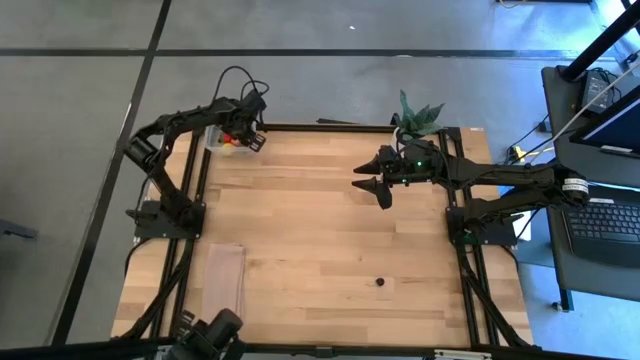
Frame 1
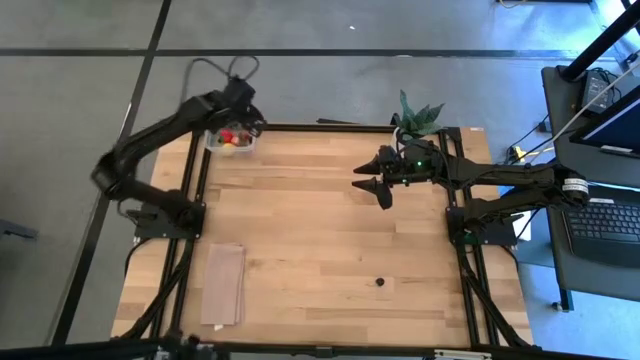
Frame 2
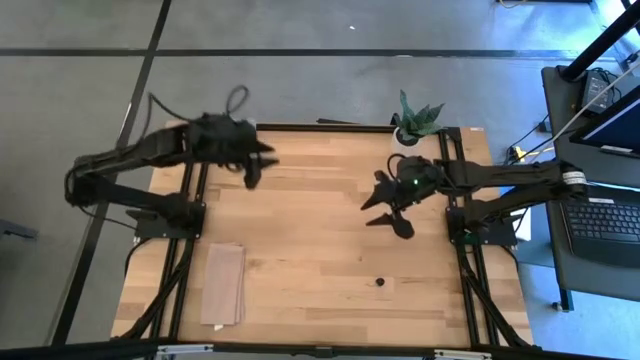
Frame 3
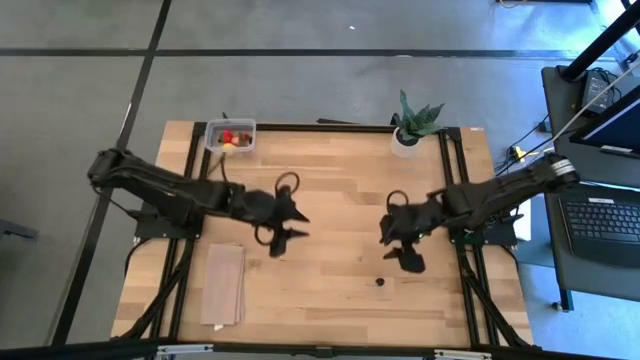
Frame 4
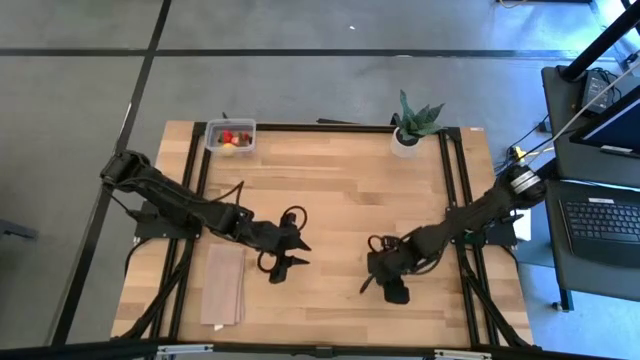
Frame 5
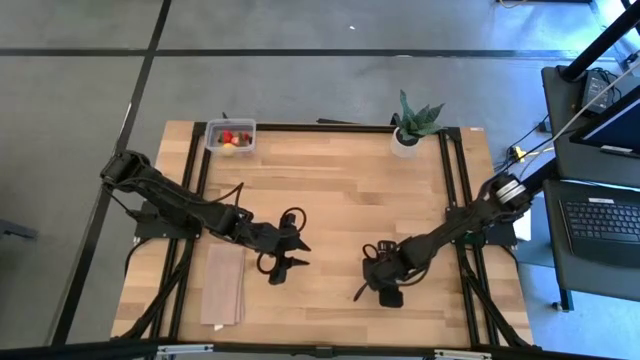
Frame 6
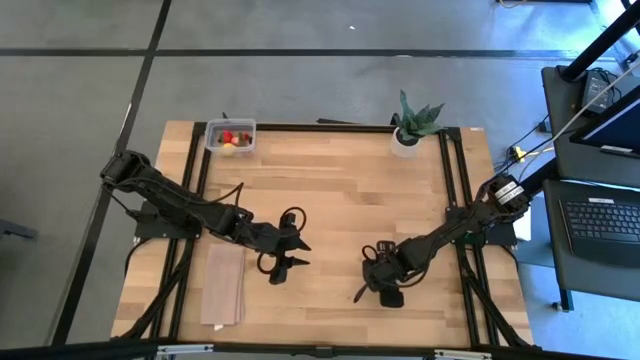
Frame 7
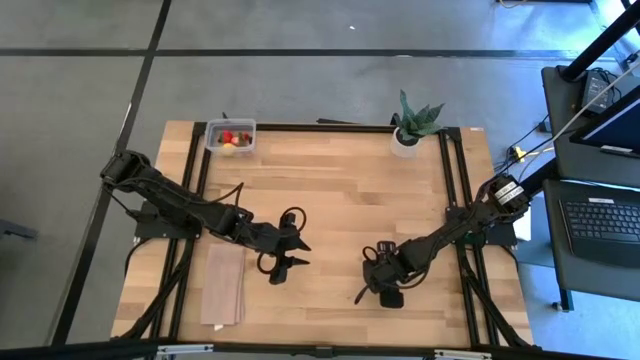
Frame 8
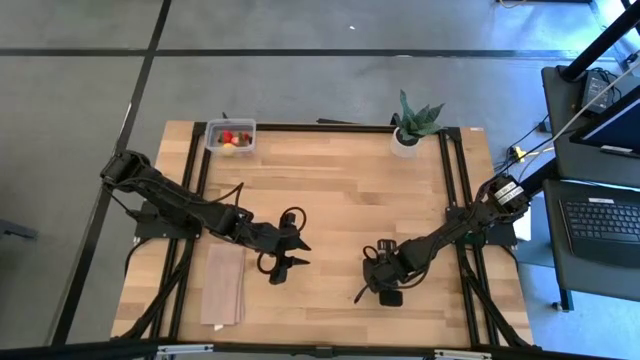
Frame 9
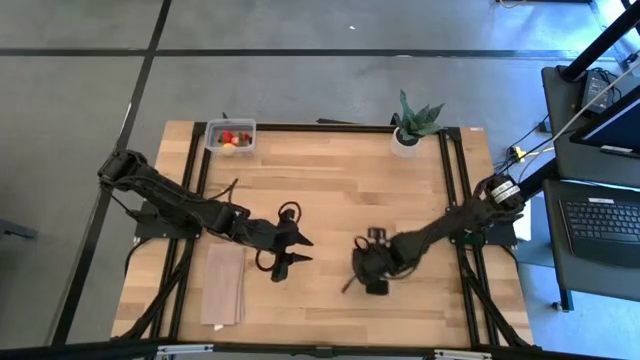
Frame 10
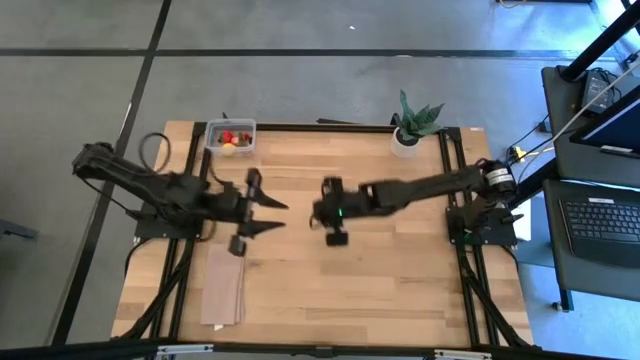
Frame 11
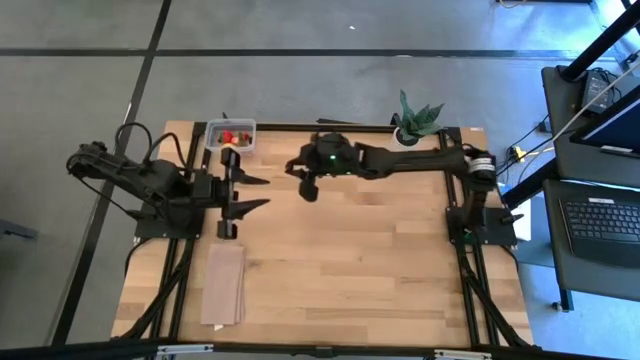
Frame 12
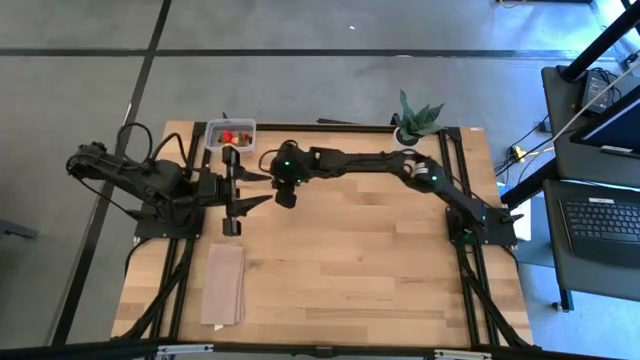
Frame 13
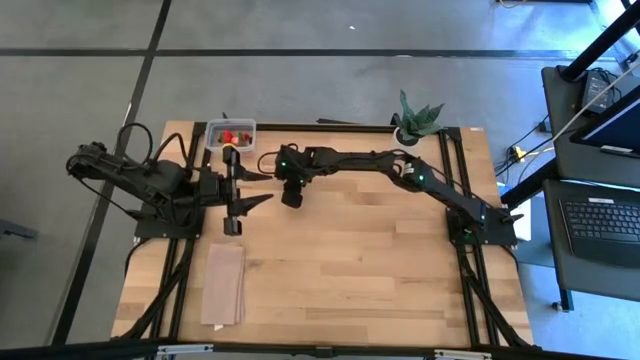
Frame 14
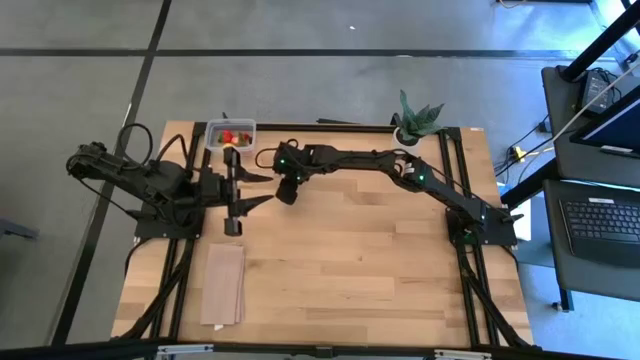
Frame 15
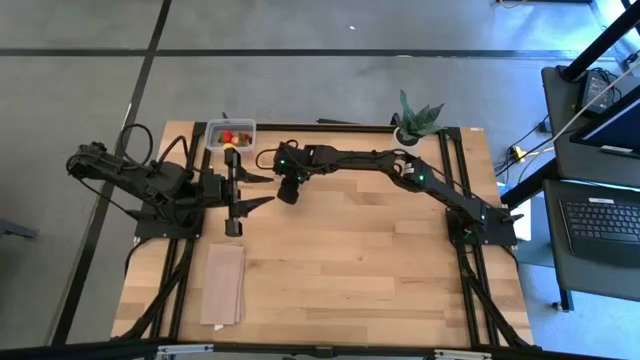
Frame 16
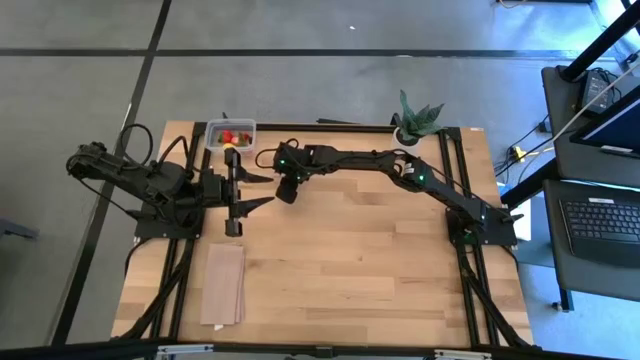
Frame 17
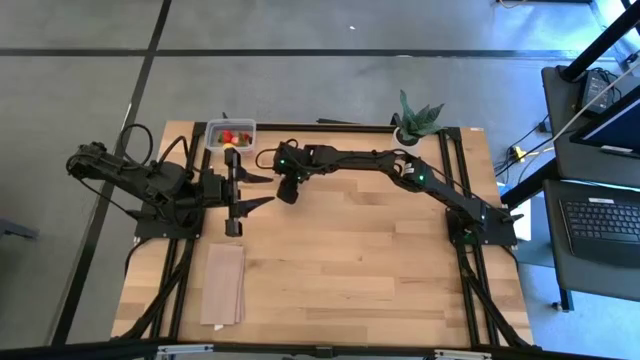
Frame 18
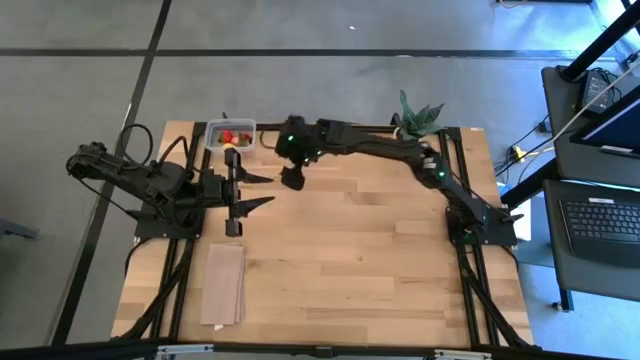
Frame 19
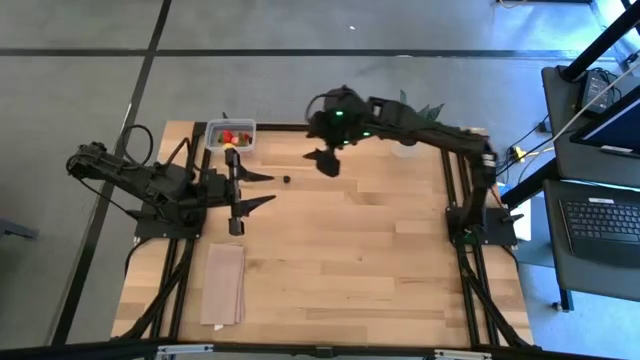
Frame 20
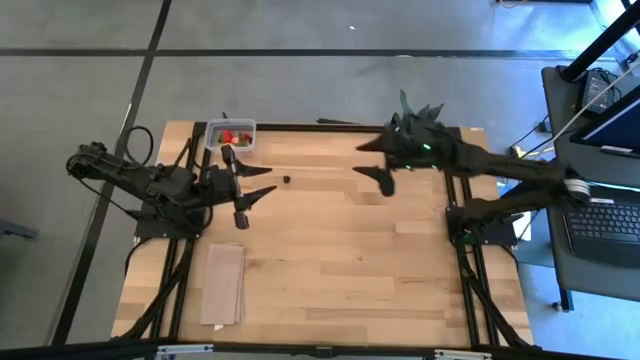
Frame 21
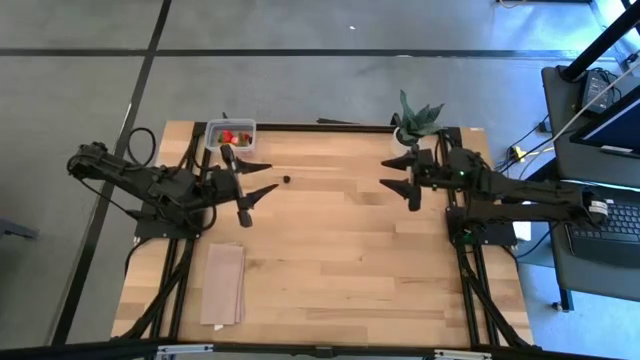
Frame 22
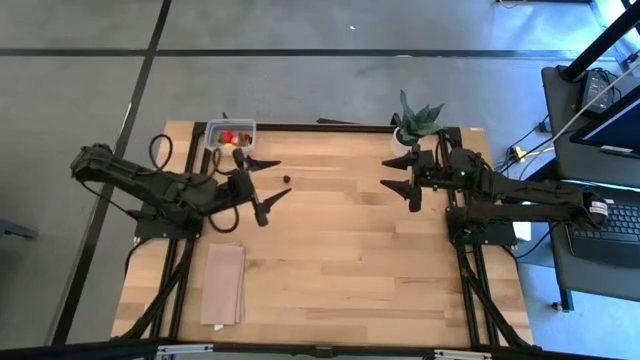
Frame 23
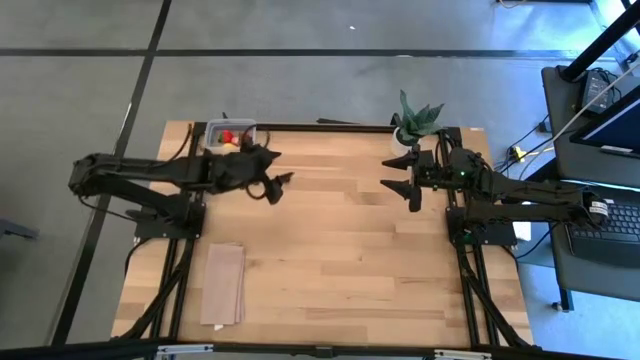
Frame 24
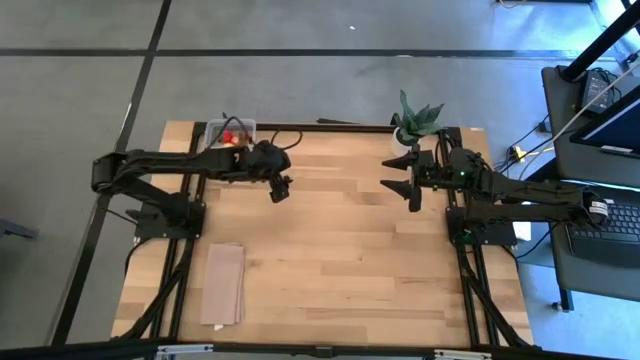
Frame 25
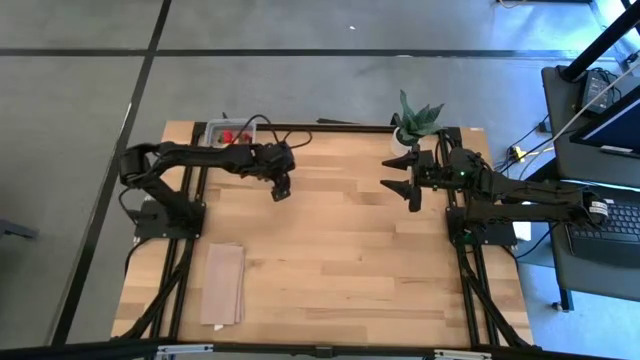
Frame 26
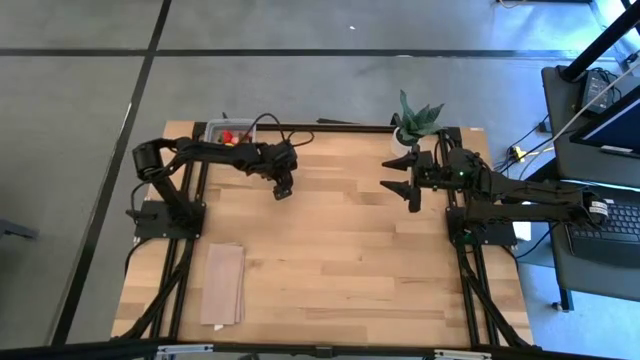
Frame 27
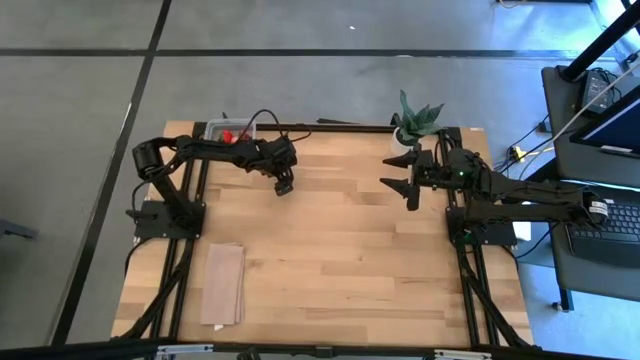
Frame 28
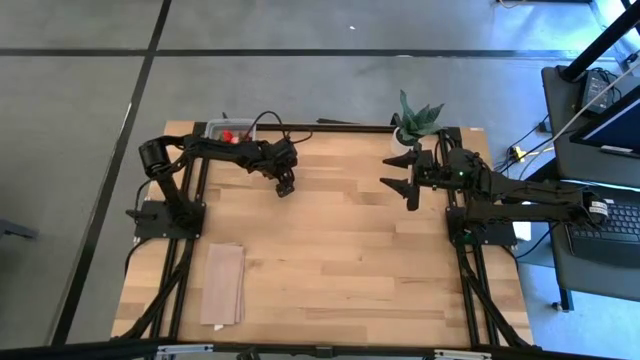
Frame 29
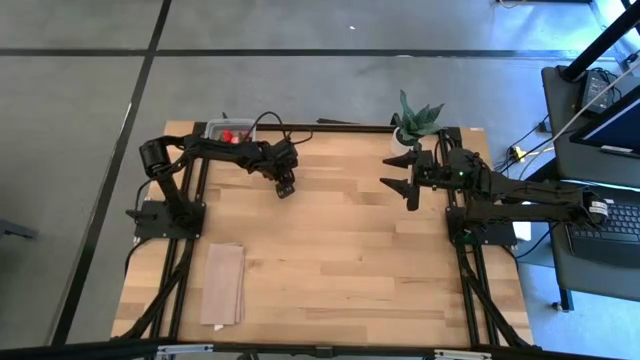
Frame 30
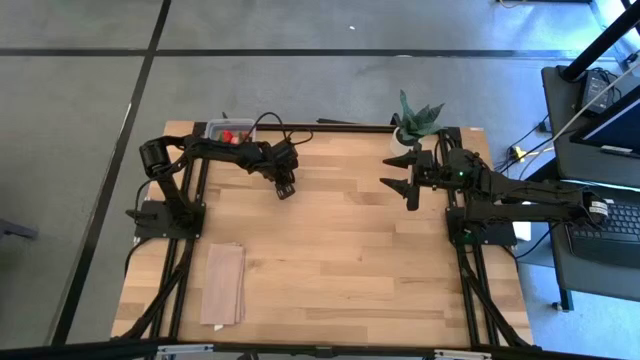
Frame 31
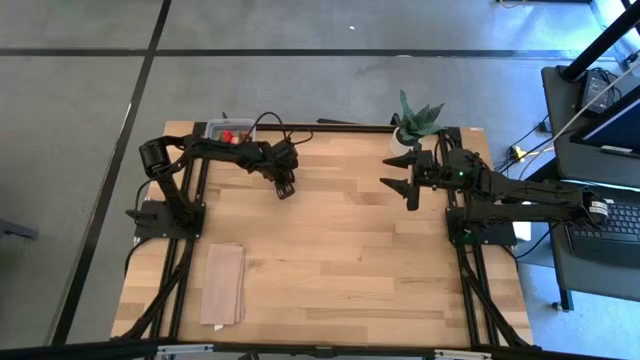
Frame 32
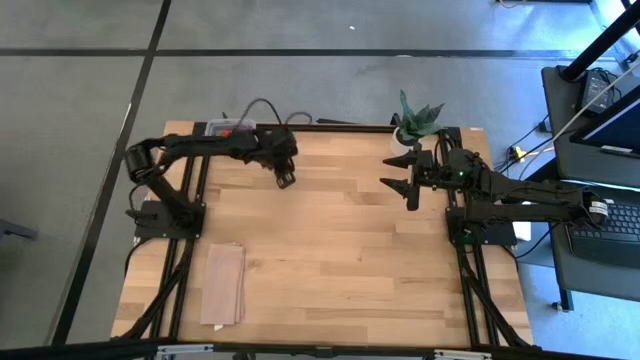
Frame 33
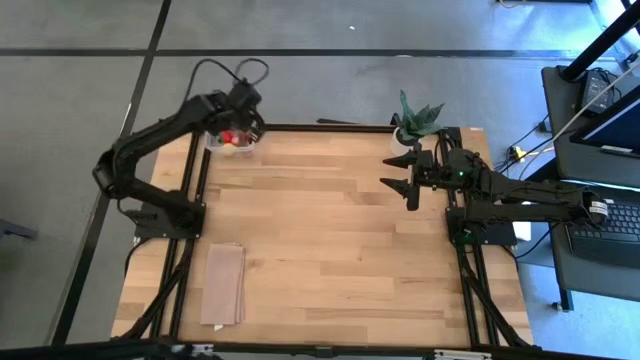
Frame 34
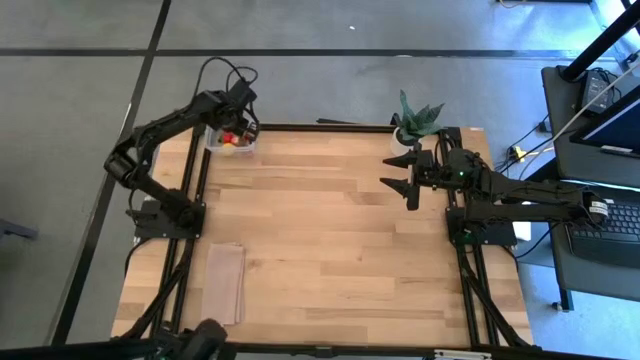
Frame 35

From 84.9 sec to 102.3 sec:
Task: Pick and placing Produce into tupperware
Put the black cherry into the transparent container

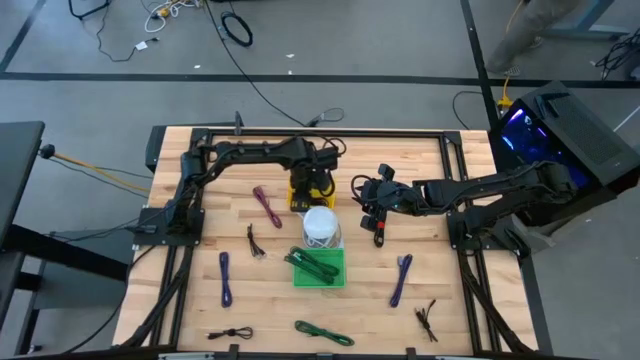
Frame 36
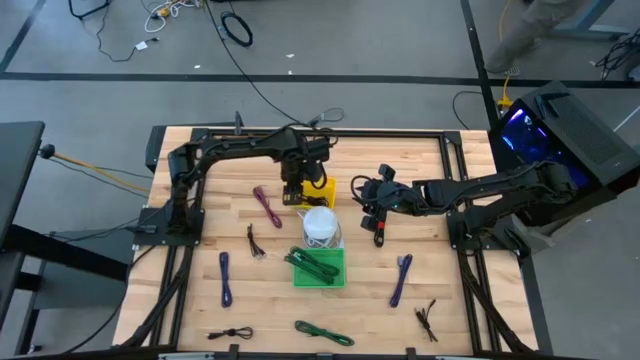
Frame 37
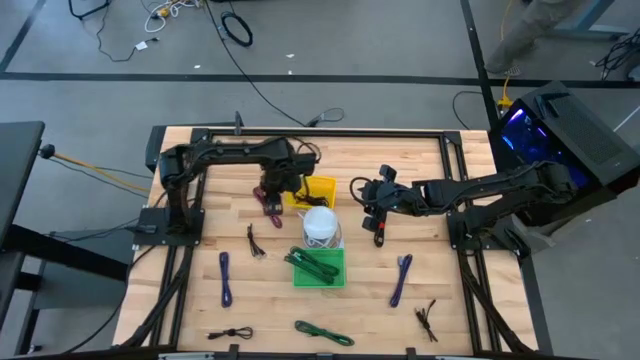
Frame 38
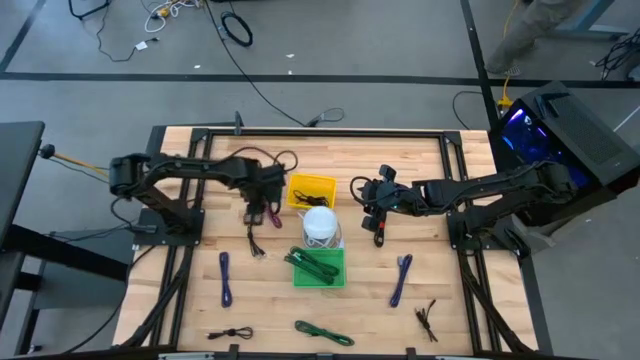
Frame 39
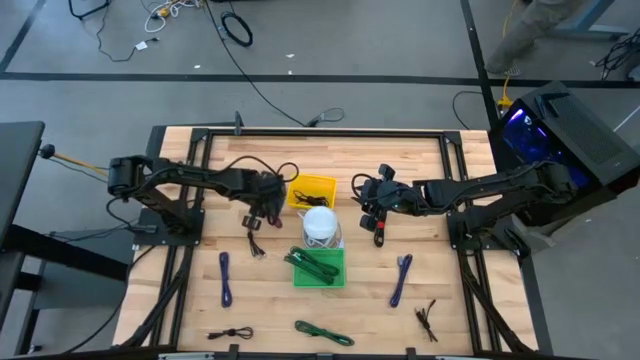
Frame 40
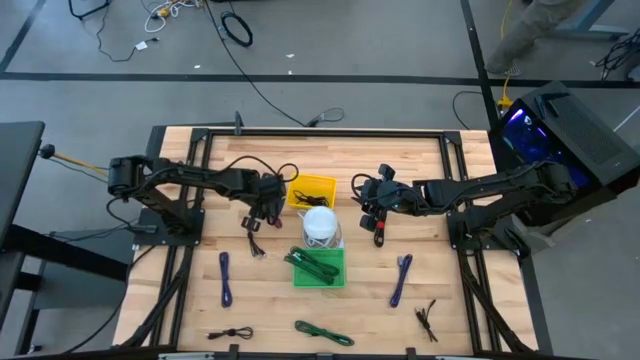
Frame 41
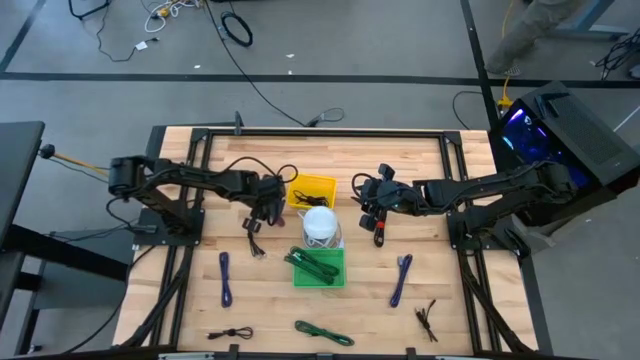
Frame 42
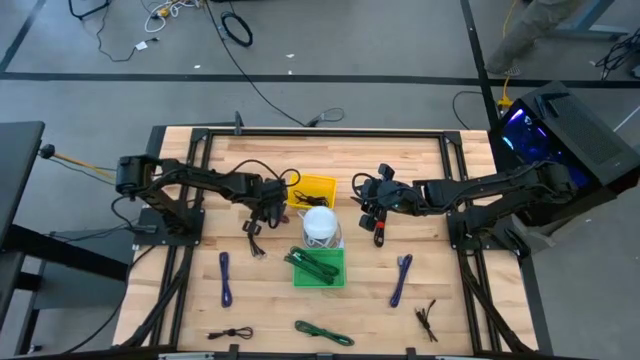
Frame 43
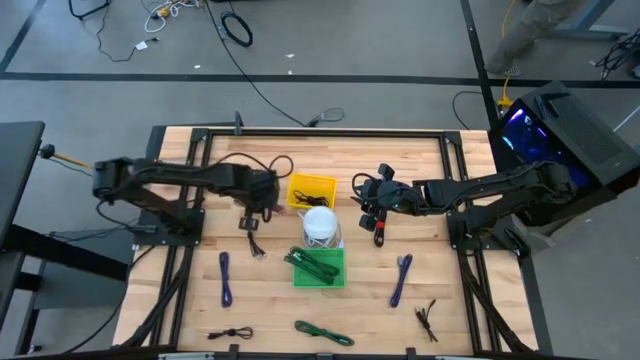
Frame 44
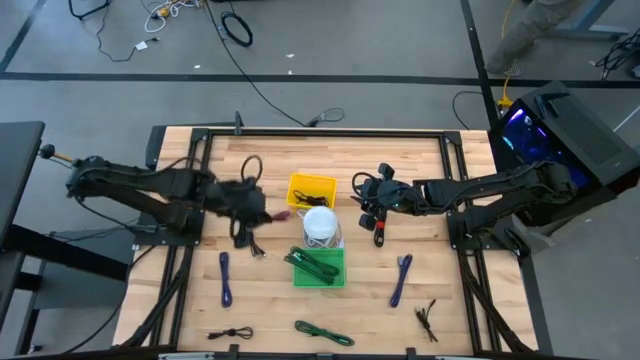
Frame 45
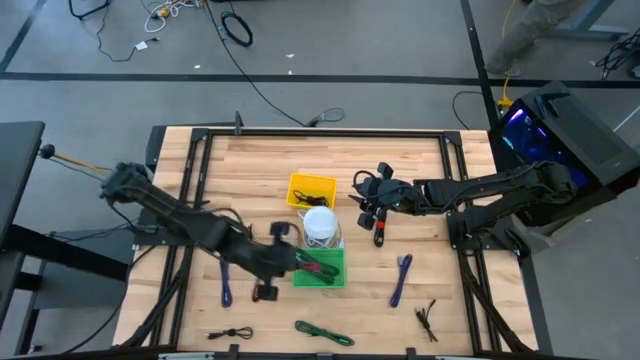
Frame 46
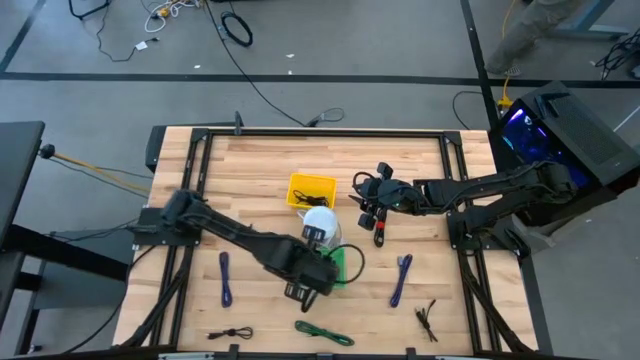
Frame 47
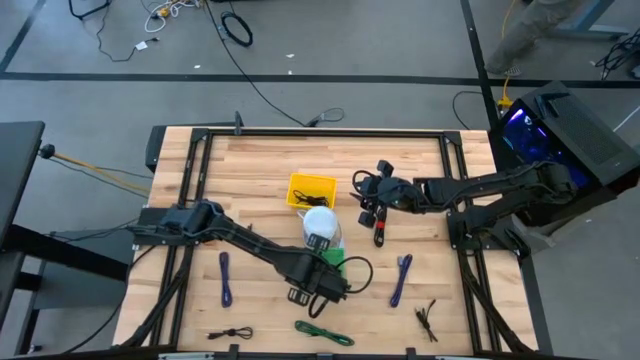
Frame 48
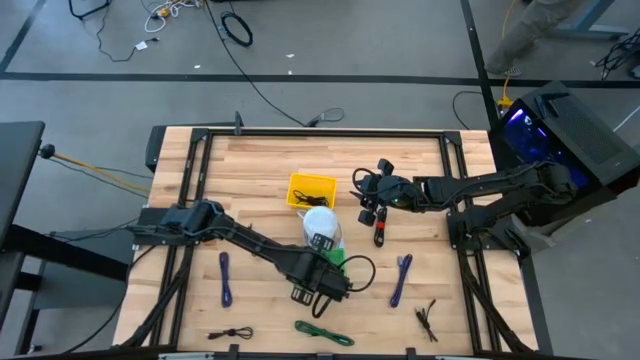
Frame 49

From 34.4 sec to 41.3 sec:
Task: Pick & Place USB Port
Put the pink and black USB cable into the green bin
